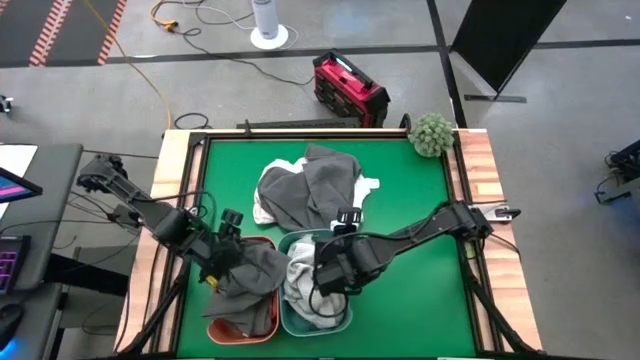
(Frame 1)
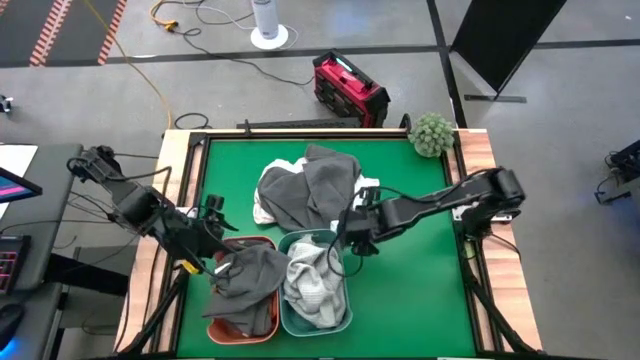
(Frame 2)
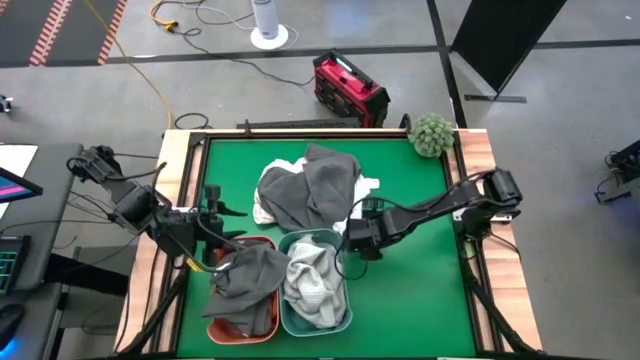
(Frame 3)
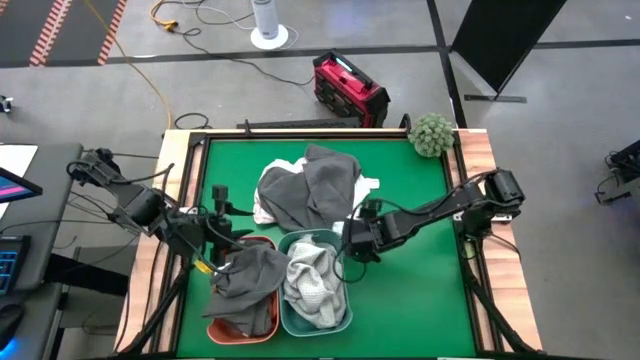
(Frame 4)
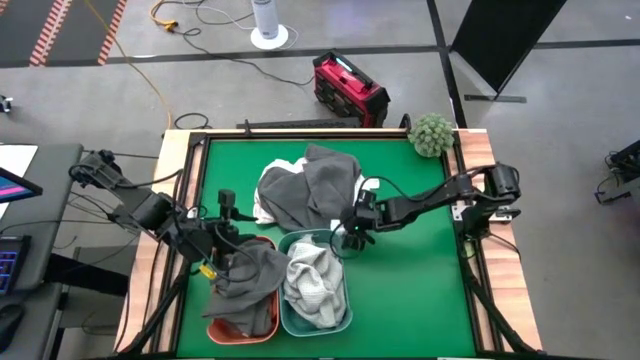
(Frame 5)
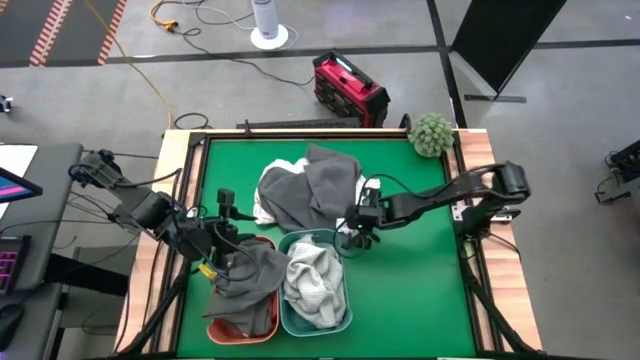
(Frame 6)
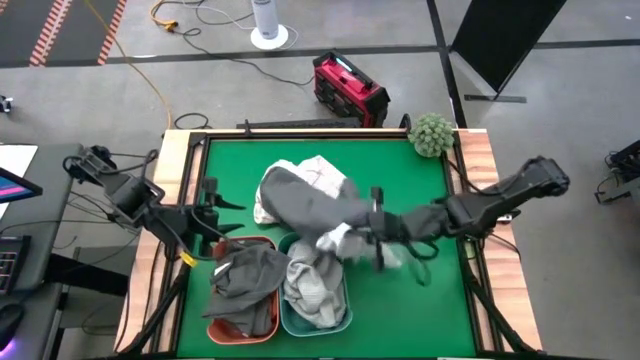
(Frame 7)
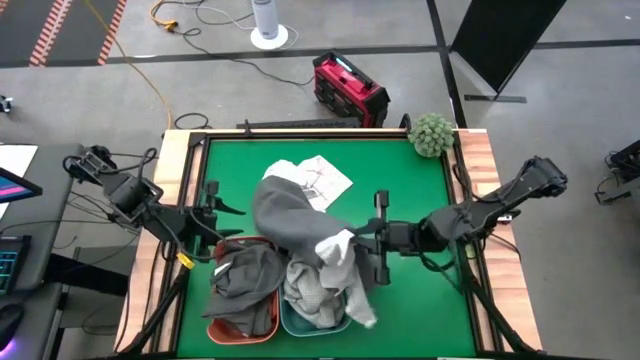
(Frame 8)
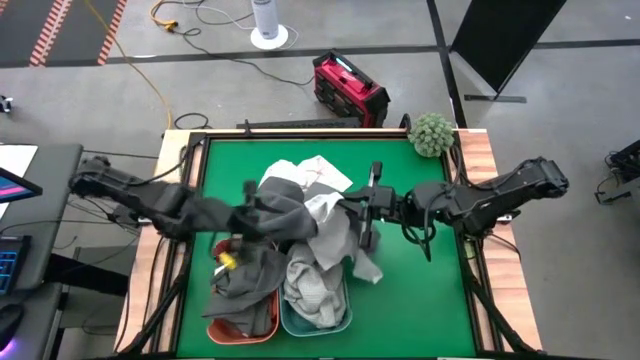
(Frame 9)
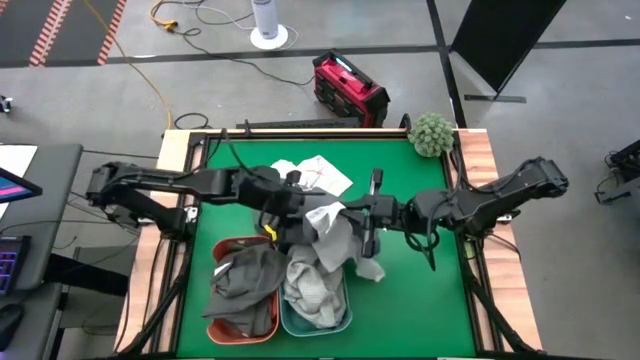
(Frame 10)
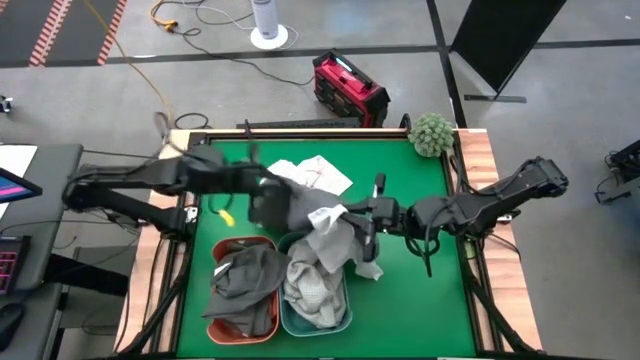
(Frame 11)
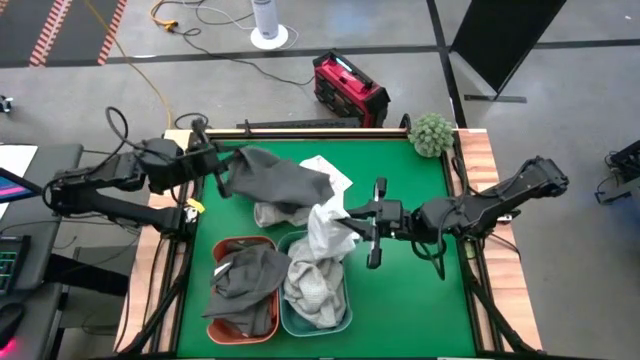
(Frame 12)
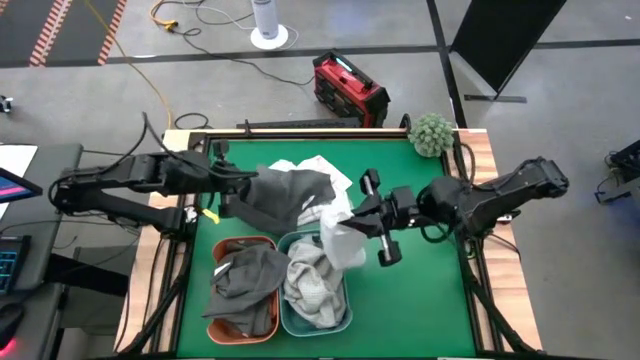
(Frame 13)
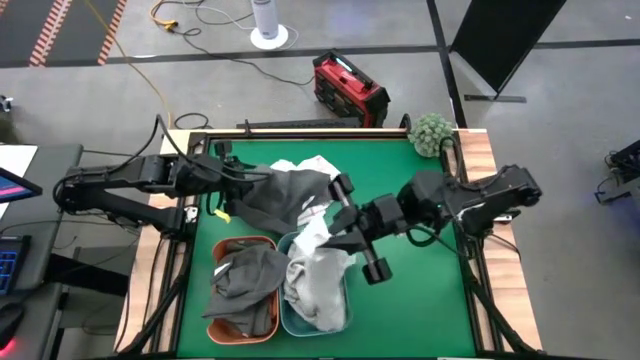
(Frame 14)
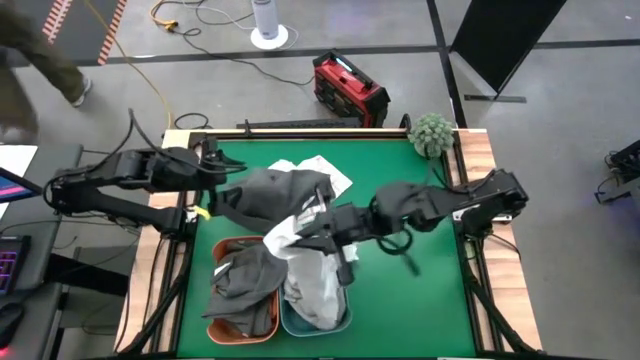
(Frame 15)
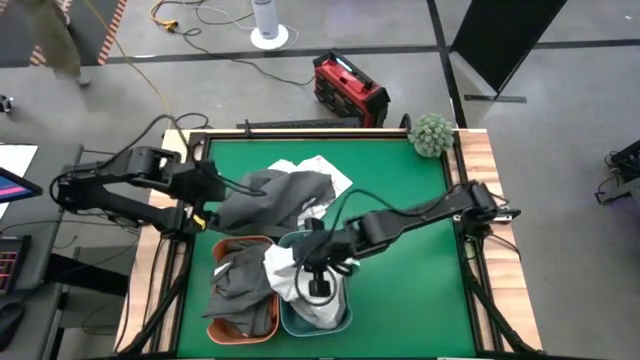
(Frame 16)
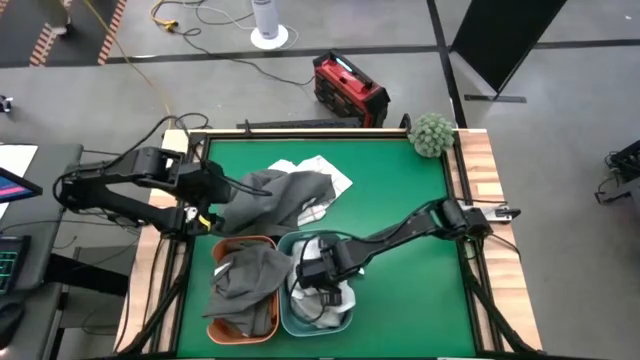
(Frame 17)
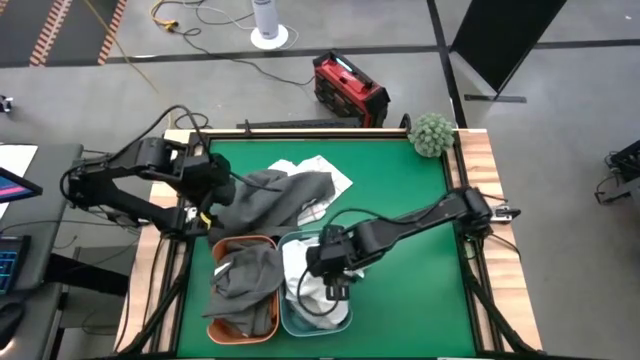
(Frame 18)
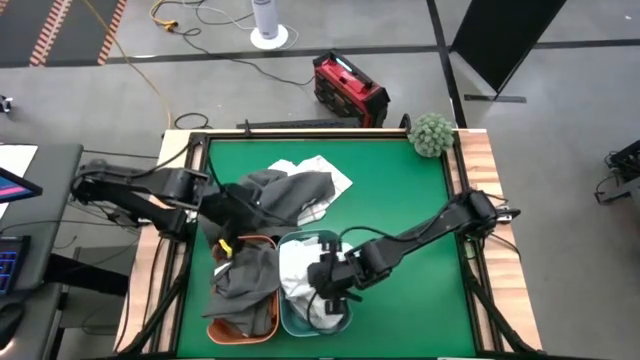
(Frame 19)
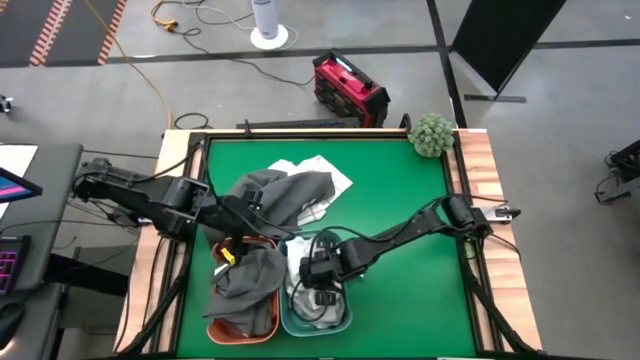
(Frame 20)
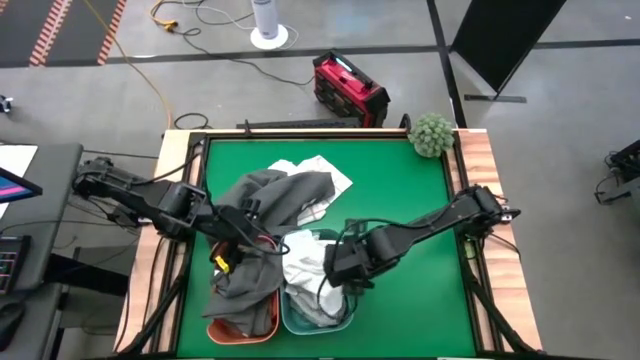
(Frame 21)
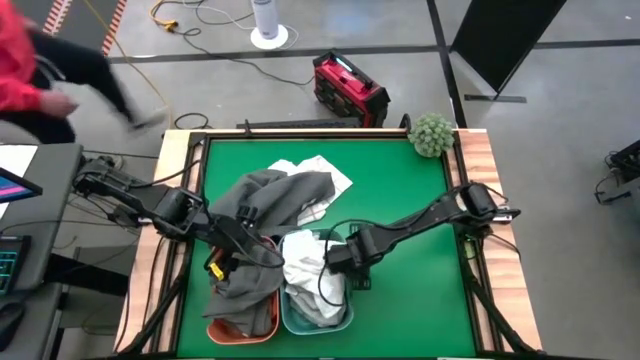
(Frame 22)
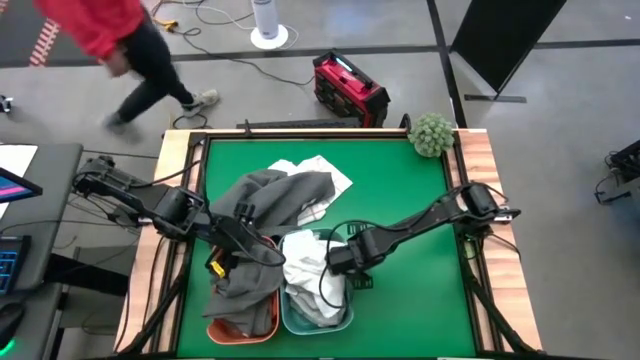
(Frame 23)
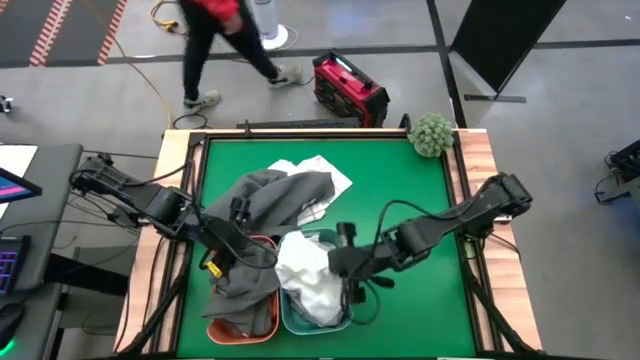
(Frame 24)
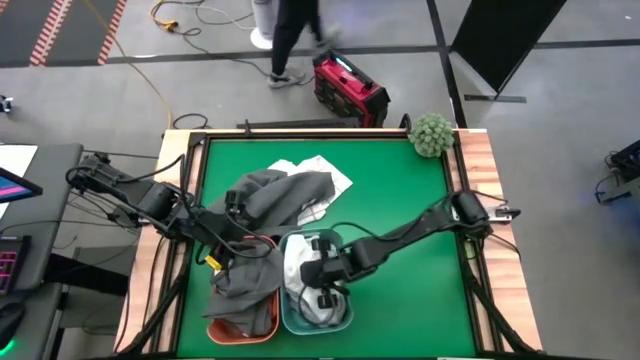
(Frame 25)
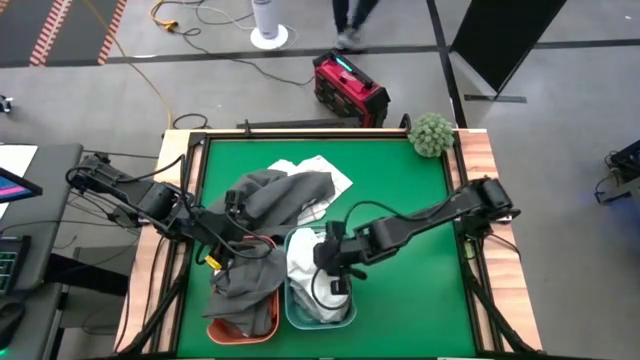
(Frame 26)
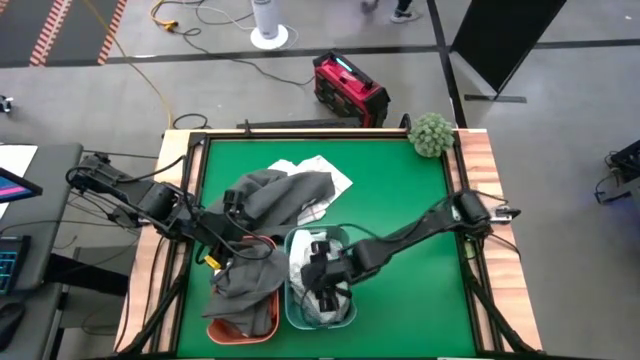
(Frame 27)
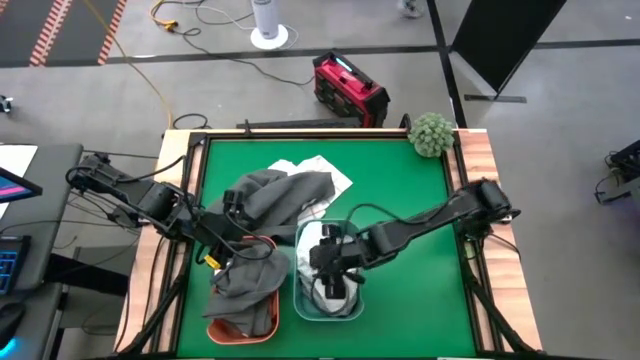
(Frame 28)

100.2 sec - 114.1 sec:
Task: Sort towels by color in basket
Put the white towel into the green bin

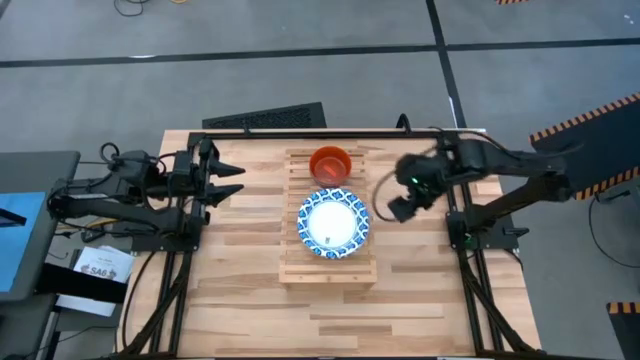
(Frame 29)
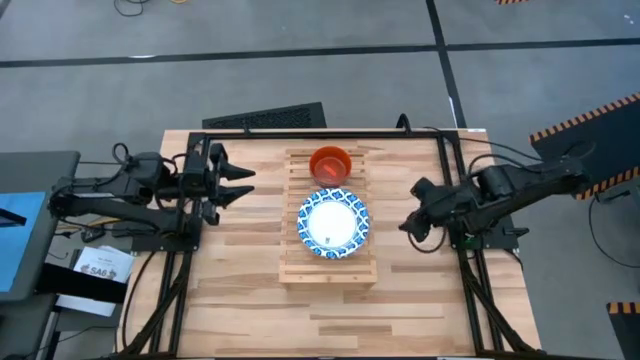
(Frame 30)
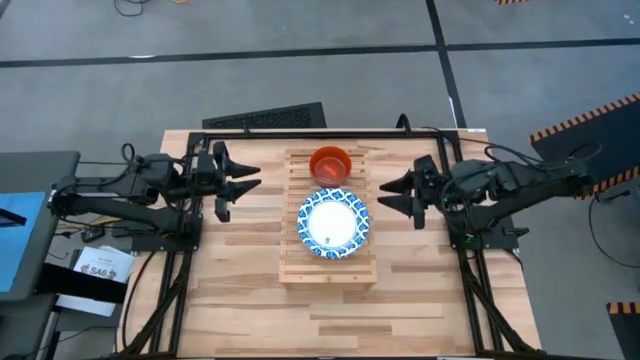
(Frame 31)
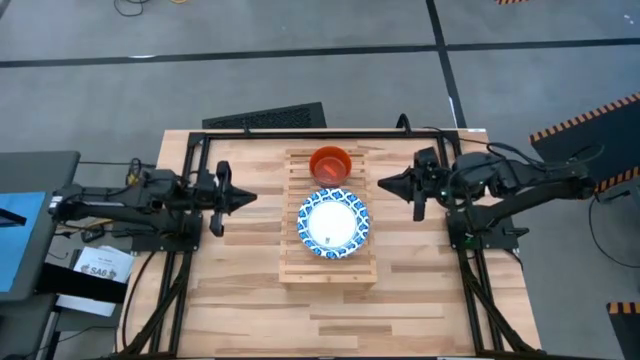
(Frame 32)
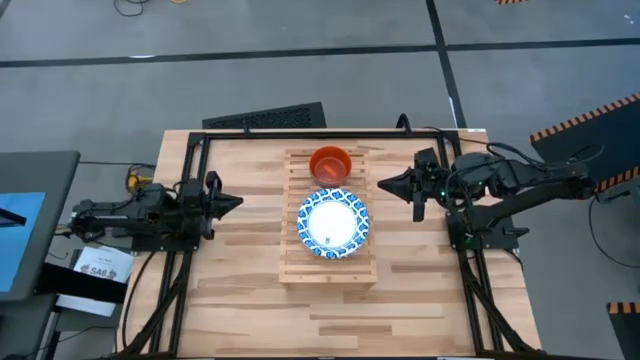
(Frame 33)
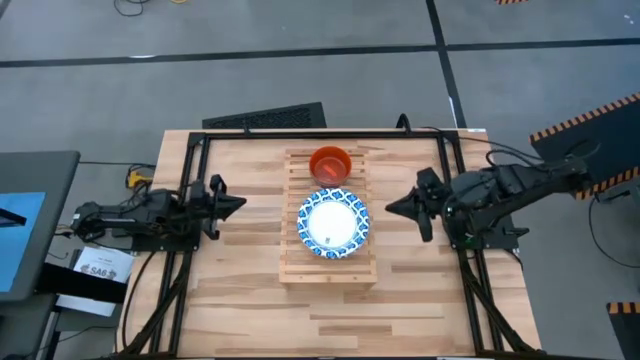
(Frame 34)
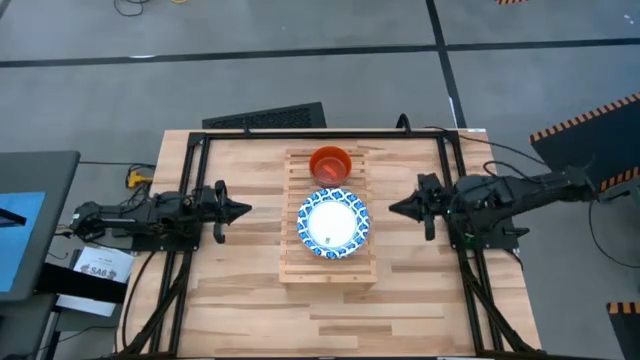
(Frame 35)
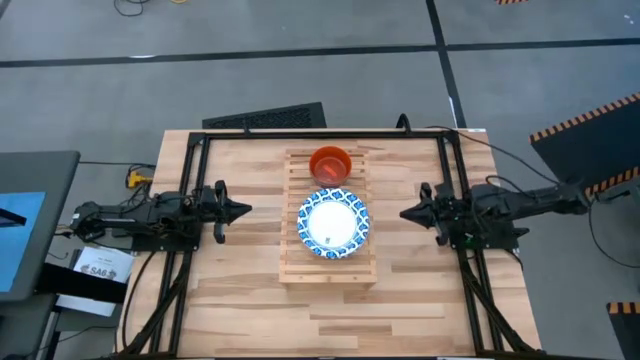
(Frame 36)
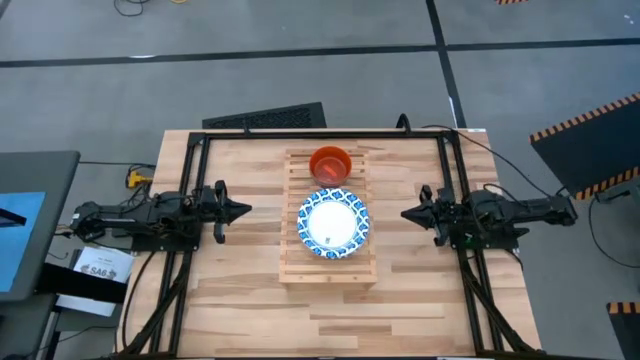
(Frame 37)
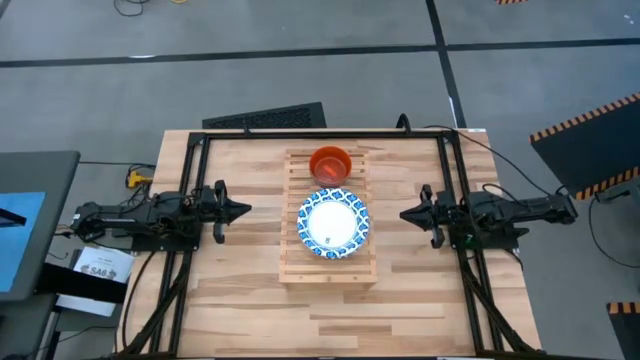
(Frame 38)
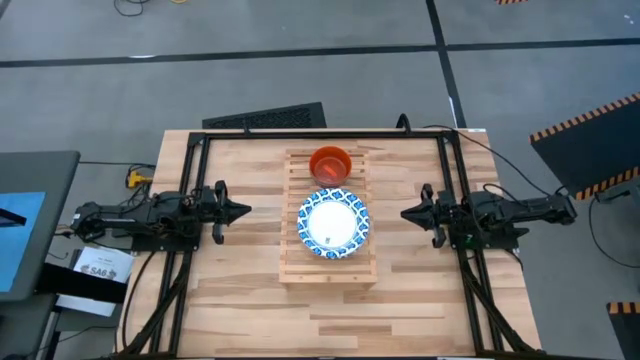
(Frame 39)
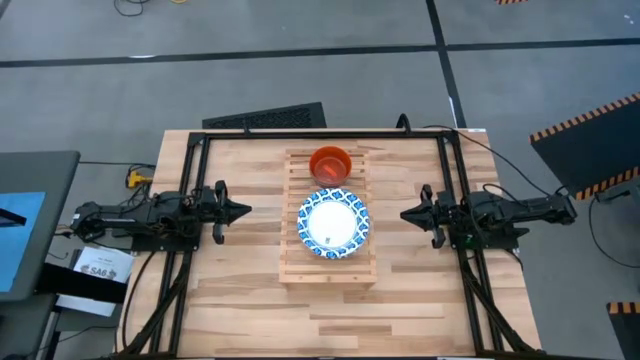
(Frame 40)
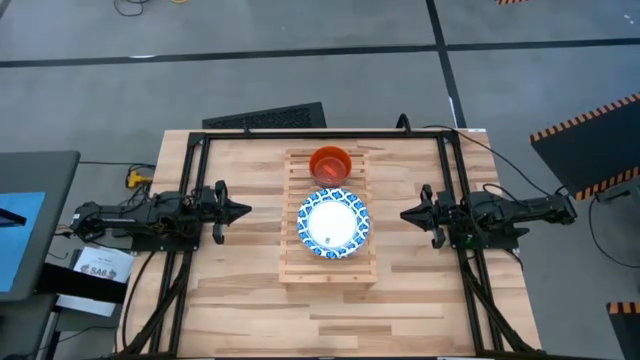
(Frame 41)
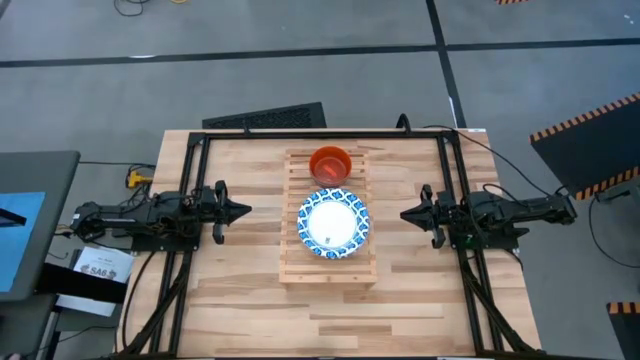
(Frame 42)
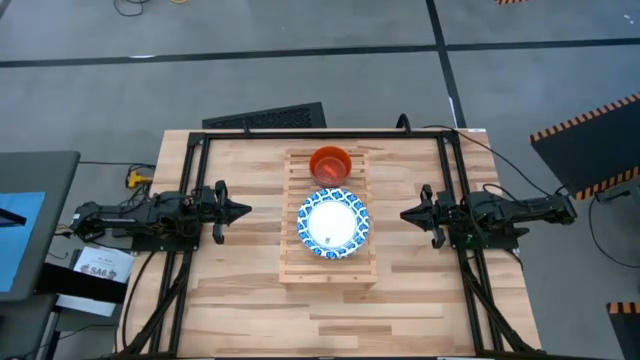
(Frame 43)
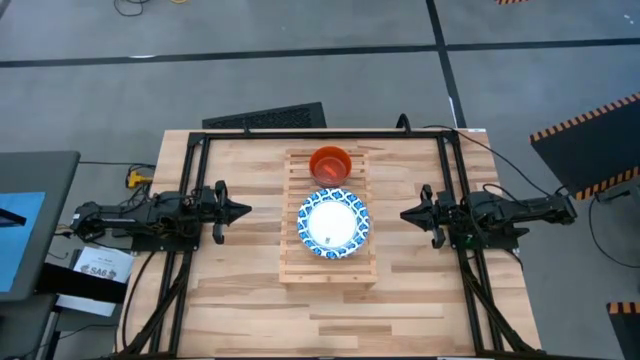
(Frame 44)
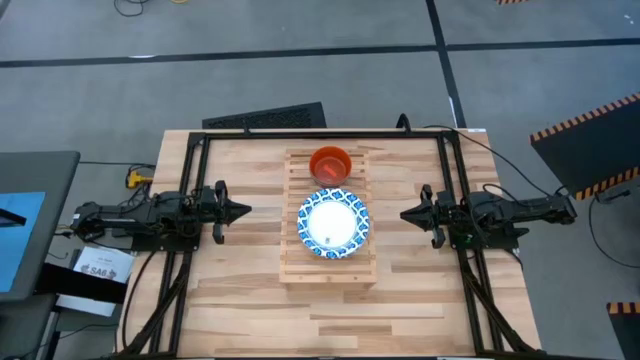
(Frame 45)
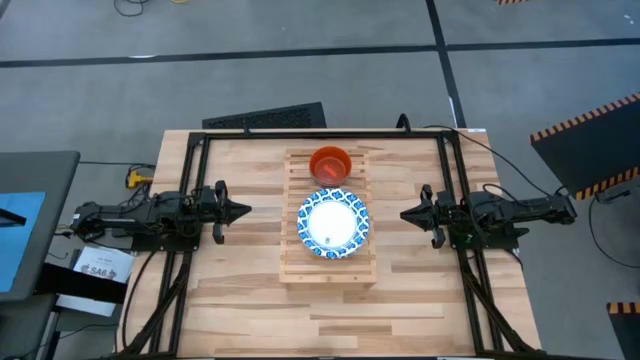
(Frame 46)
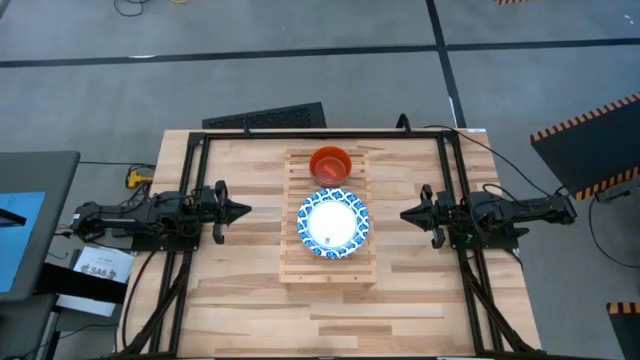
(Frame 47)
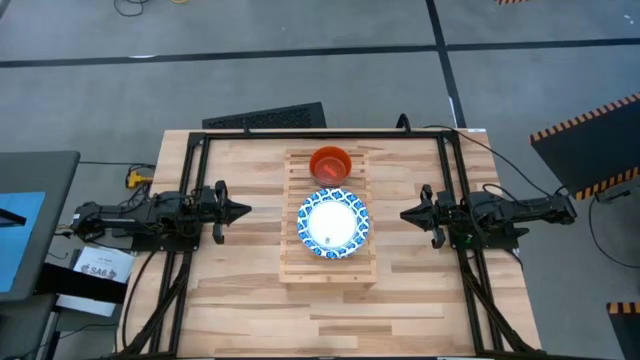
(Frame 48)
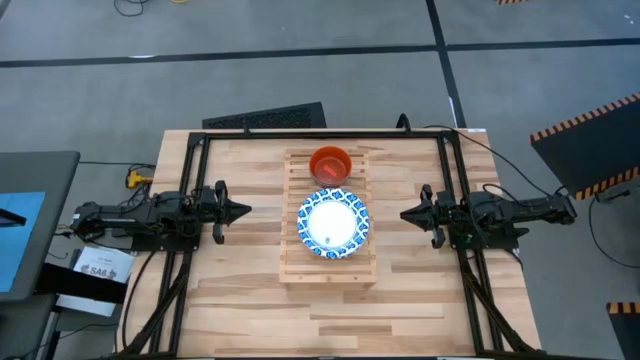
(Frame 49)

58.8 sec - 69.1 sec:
Task: Place and stack bowls onto a shelf
Return to Home Position
